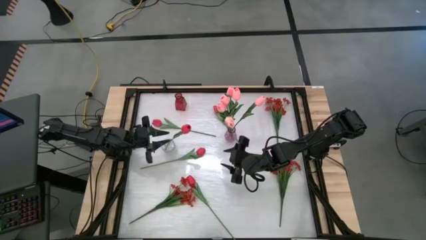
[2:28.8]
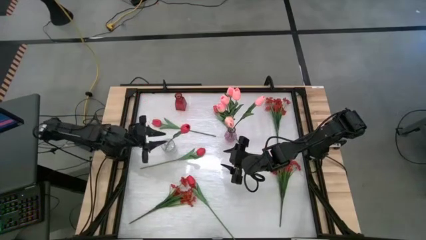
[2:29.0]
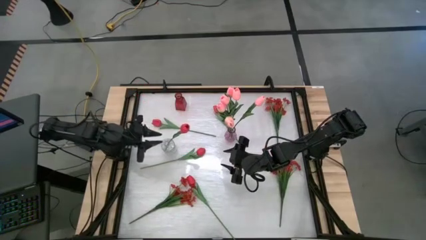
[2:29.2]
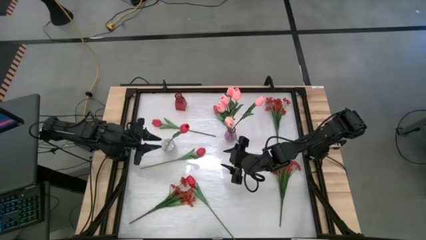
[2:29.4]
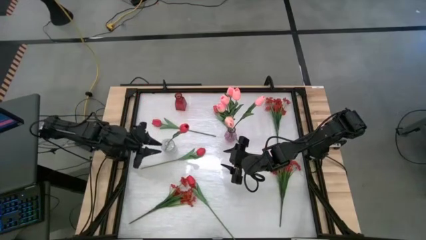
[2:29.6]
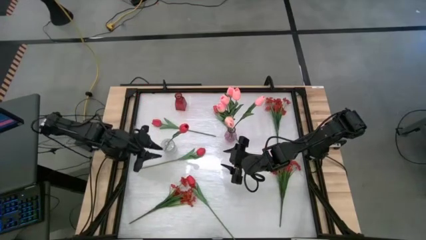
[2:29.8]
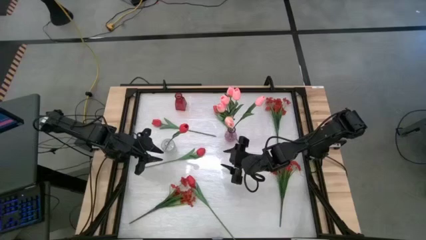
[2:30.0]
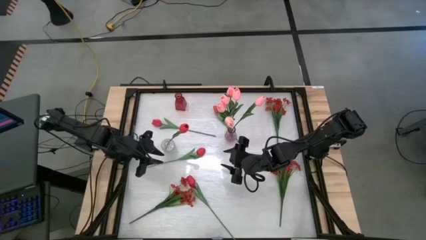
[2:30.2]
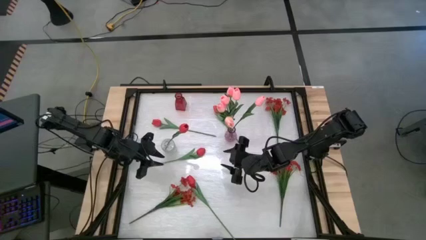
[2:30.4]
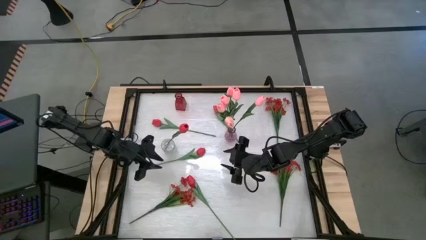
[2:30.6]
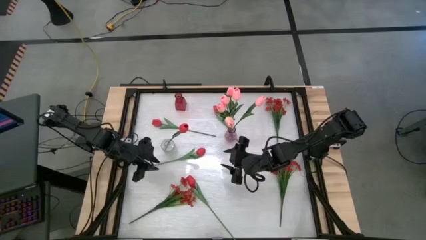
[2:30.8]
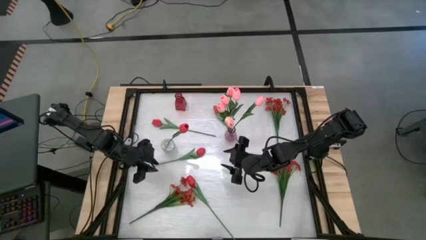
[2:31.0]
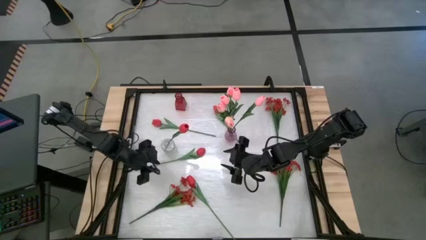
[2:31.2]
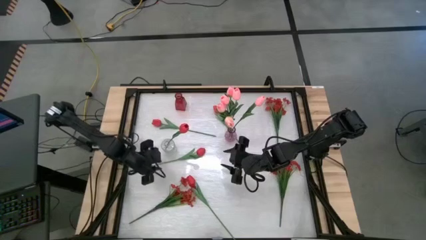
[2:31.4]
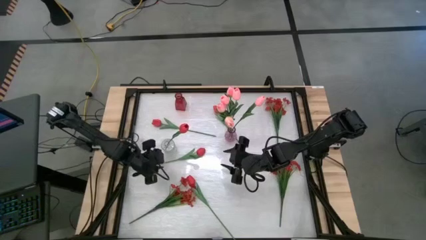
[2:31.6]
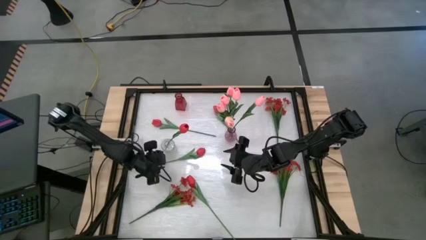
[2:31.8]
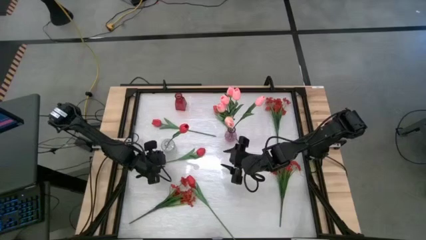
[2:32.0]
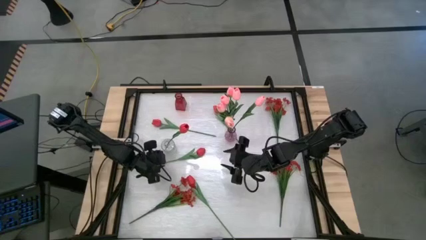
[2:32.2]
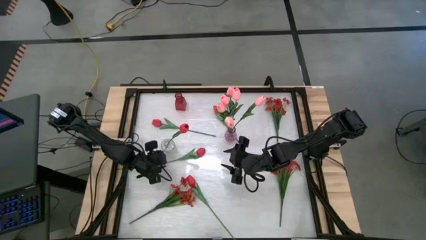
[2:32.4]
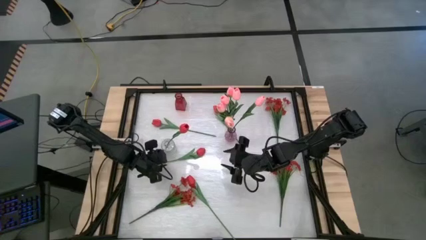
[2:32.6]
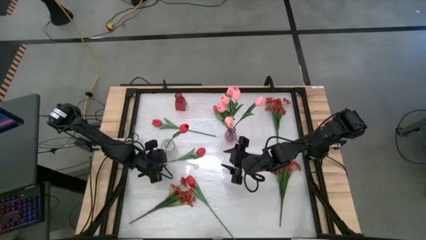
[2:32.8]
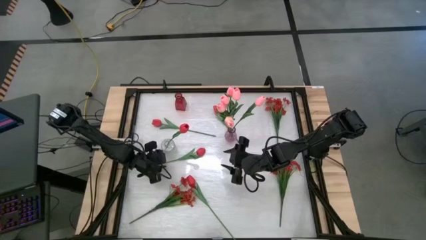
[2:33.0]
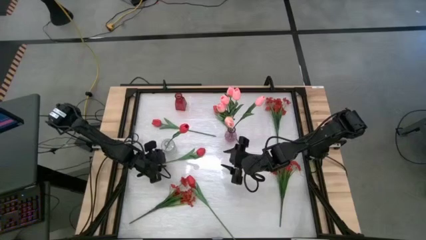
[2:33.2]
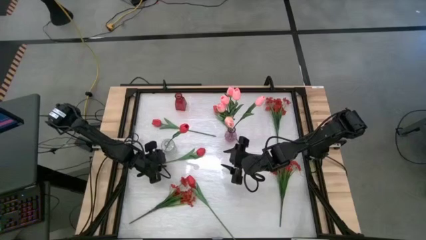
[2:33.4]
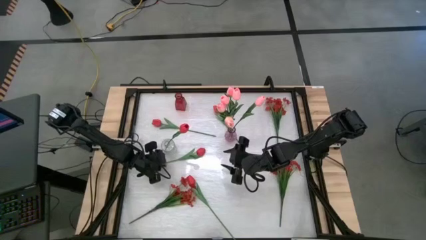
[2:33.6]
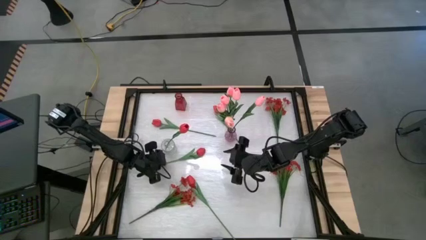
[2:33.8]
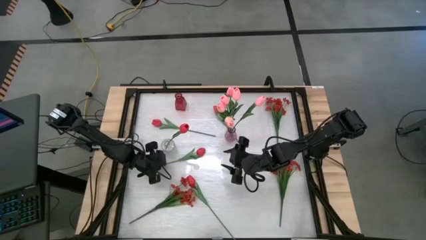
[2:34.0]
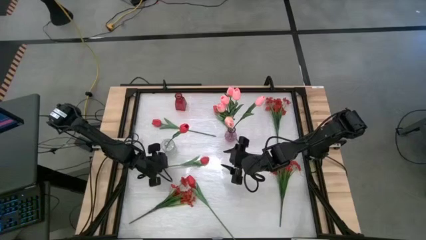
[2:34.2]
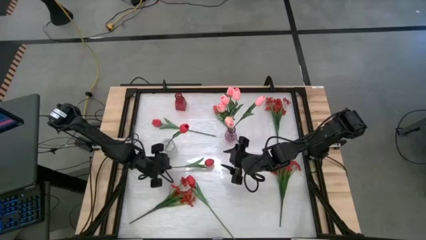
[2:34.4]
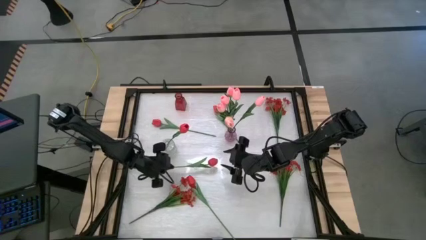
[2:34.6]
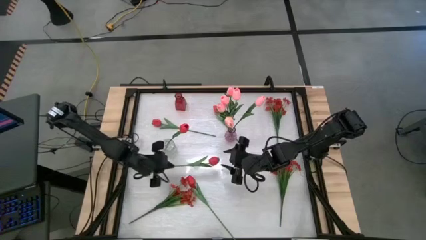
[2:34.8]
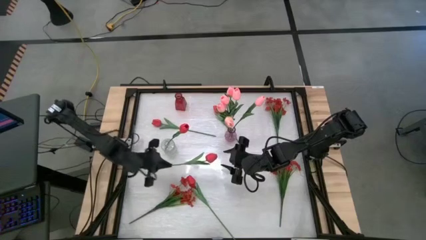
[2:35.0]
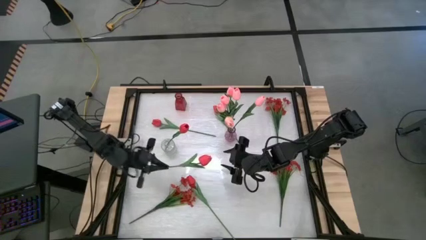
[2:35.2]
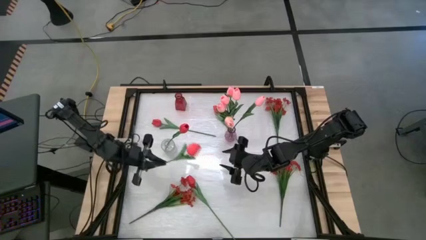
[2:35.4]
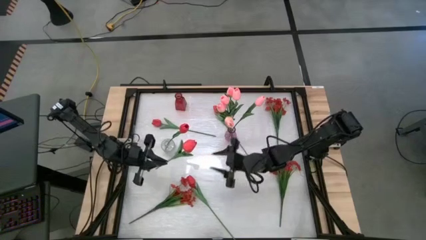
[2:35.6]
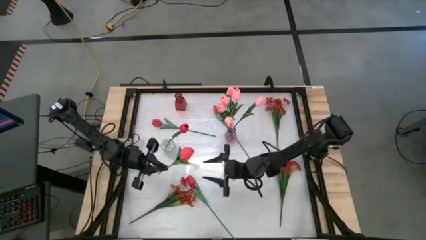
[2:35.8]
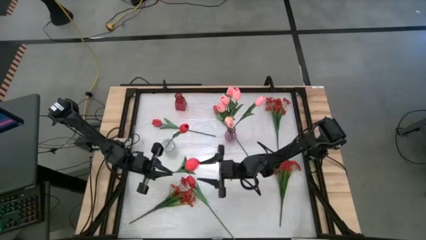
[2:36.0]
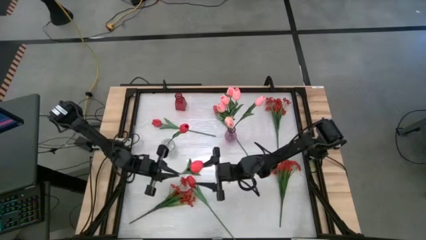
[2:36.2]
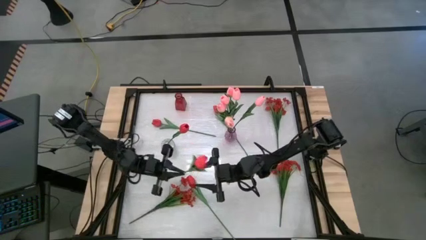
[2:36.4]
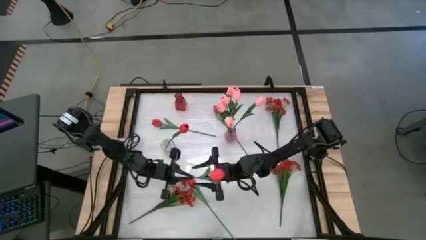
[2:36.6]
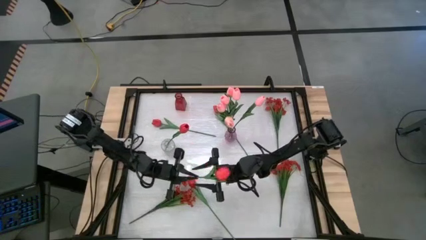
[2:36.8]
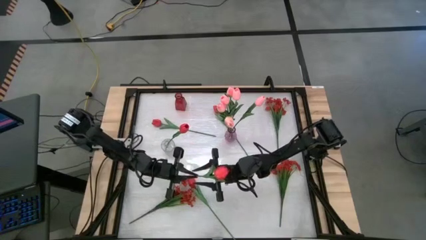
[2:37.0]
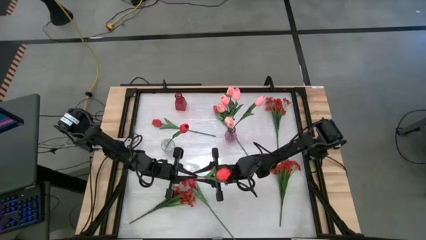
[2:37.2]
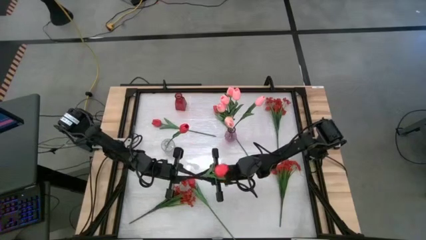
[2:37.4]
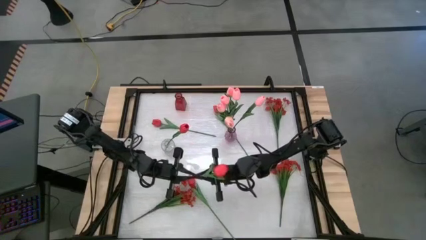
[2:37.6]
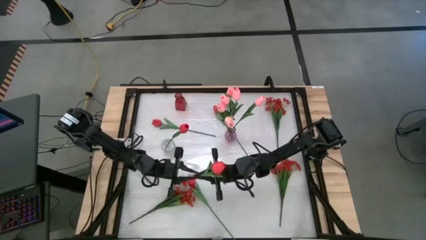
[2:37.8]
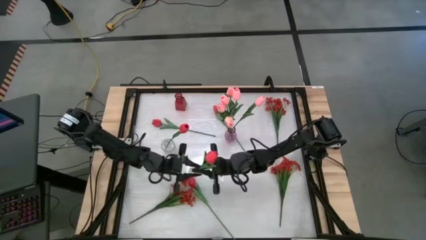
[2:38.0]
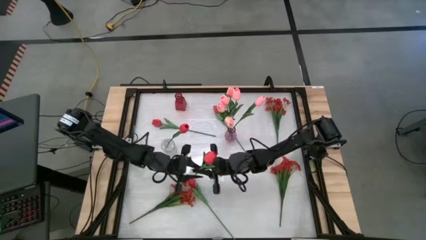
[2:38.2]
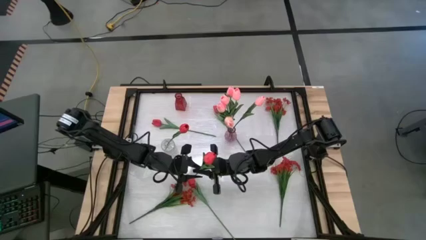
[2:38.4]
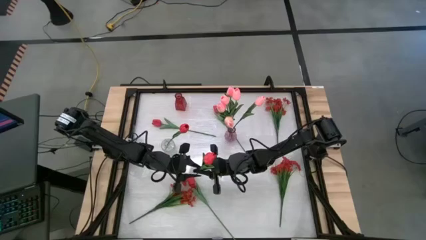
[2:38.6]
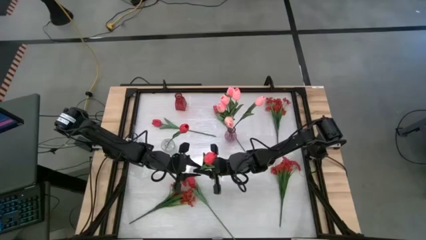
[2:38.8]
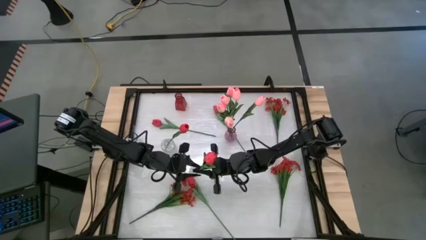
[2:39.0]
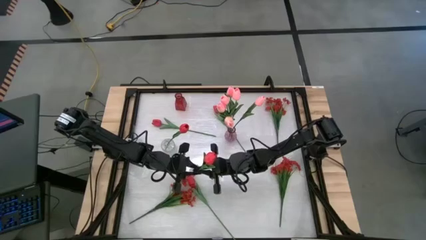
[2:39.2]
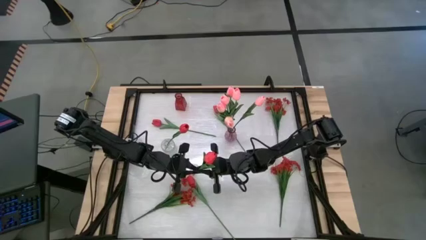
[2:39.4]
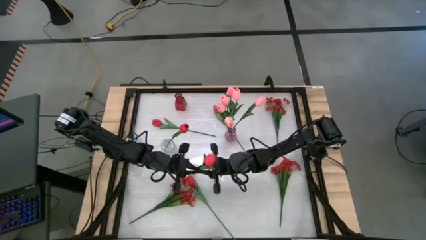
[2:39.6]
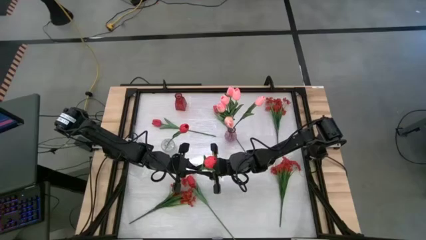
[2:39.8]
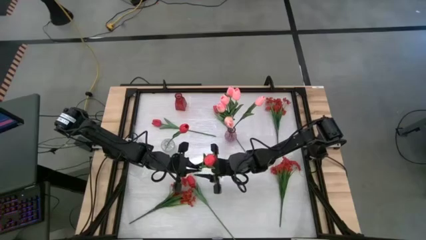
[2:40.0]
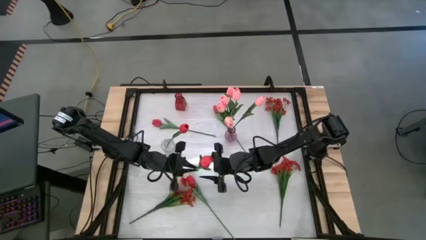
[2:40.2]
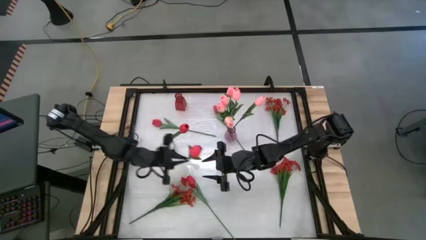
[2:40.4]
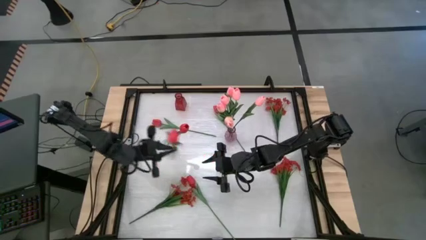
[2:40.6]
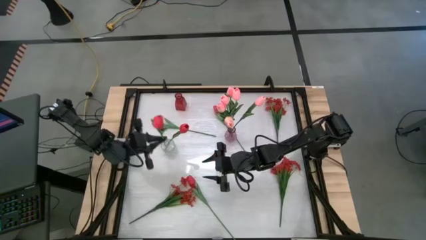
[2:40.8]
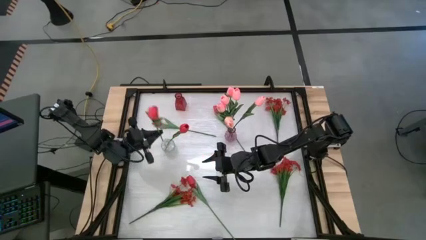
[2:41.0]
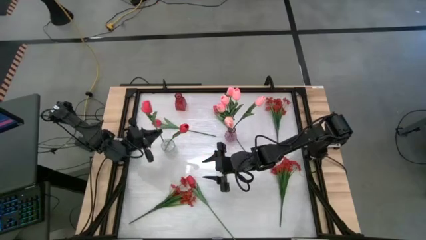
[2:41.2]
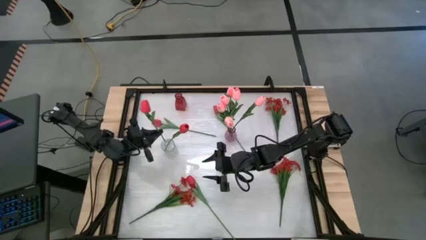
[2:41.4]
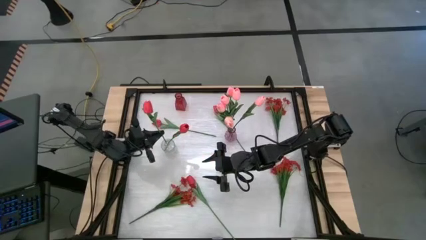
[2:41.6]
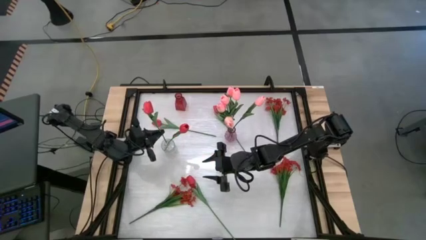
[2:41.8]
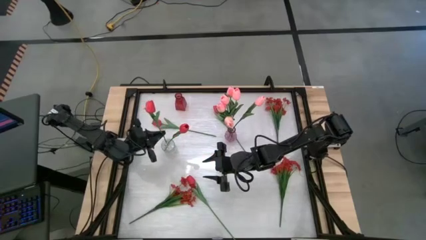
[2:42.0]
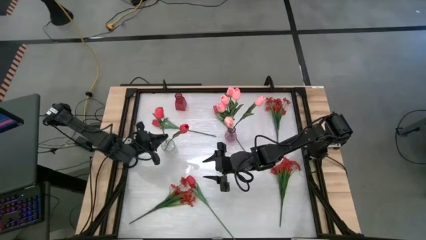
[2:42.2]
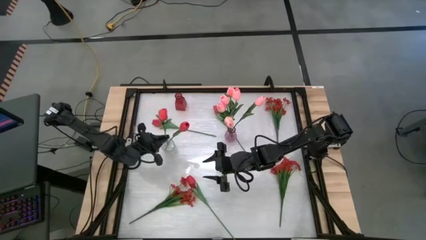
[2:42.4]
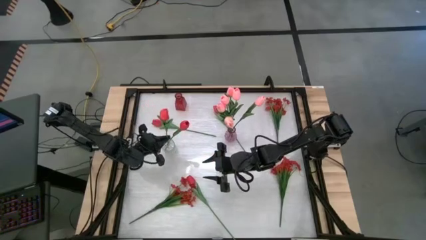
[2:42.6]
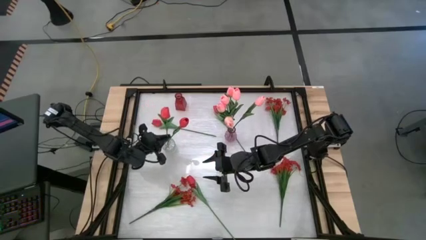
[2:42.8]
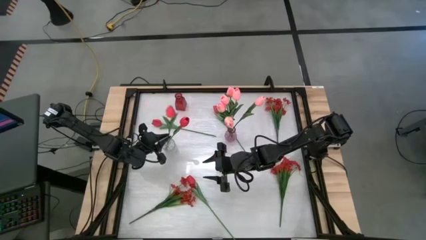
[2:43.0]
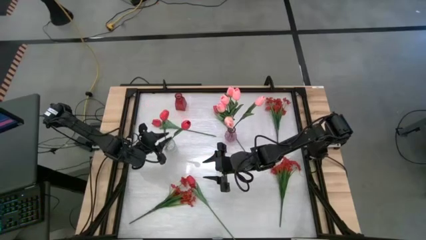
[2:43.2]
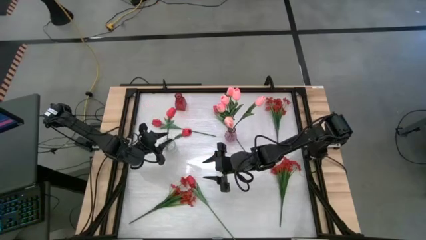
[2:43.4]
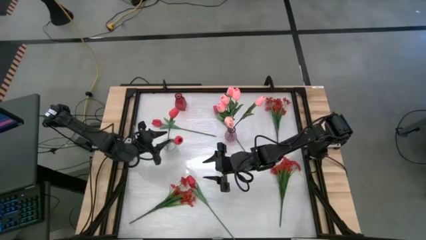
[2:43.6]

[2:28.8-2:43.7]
Task: Sort flowers into vase by color
Put the red tulip into the transparent vase

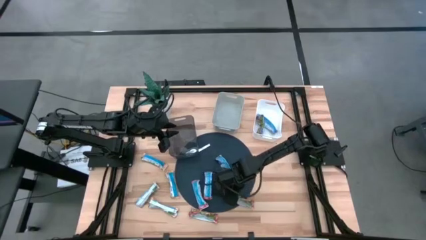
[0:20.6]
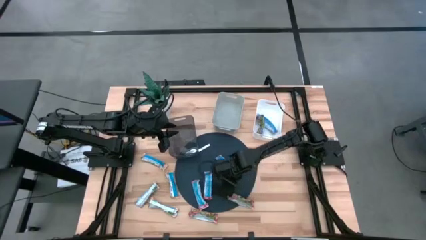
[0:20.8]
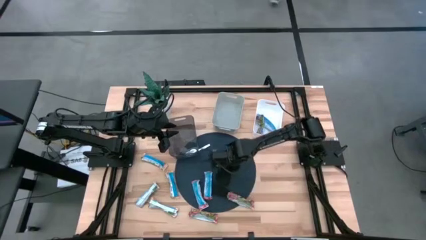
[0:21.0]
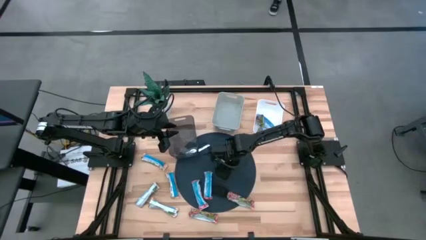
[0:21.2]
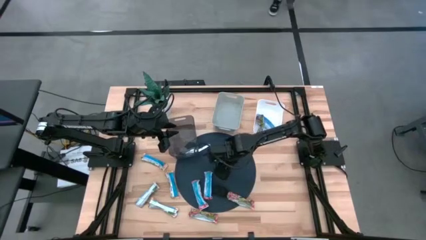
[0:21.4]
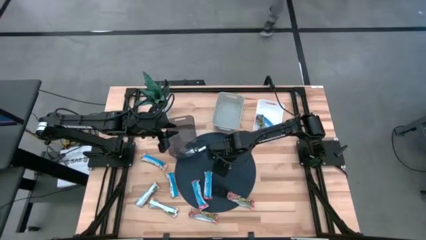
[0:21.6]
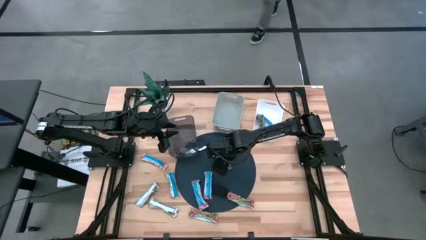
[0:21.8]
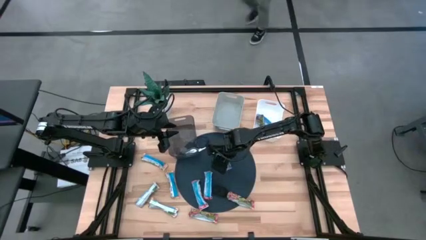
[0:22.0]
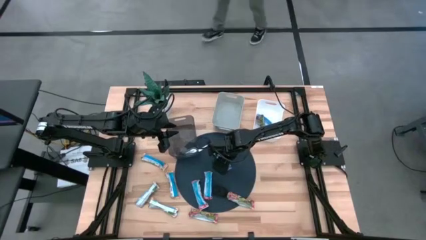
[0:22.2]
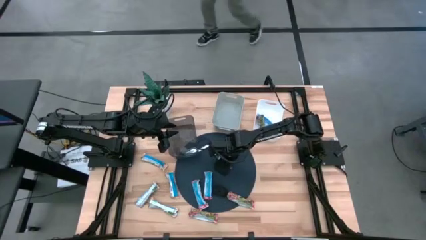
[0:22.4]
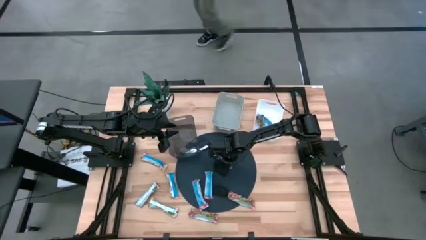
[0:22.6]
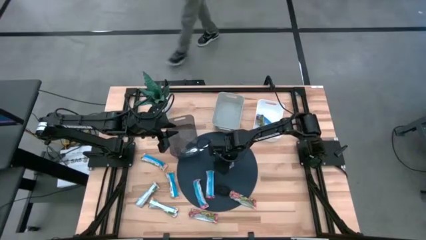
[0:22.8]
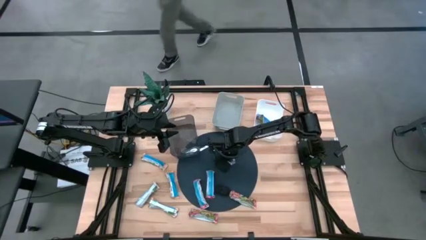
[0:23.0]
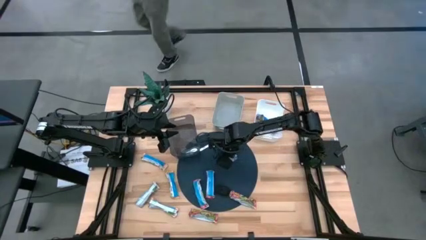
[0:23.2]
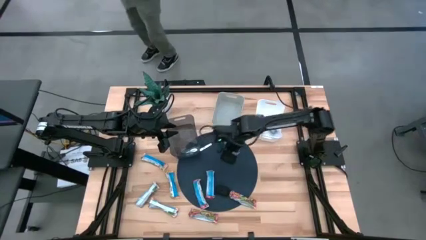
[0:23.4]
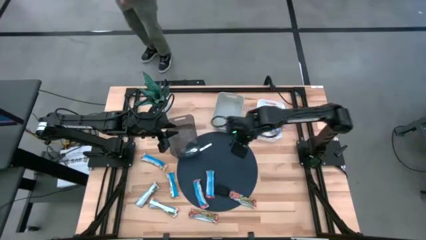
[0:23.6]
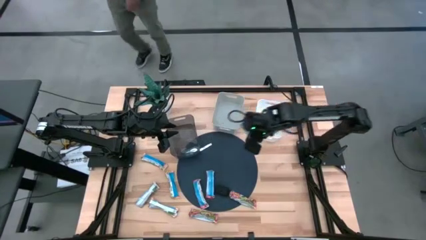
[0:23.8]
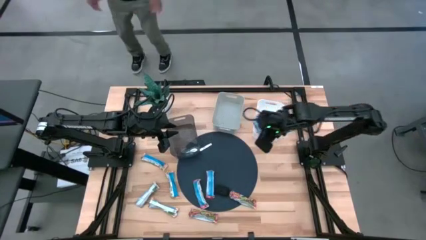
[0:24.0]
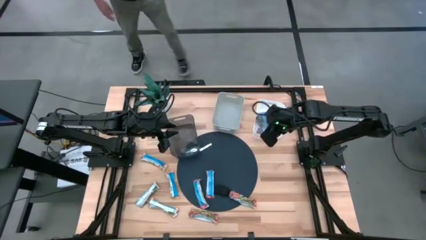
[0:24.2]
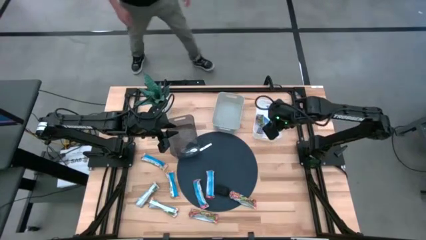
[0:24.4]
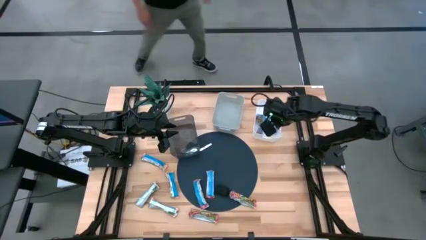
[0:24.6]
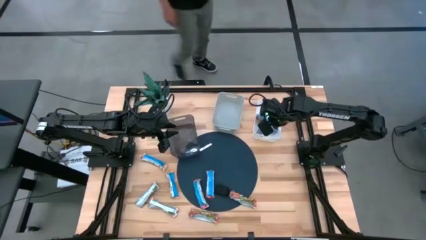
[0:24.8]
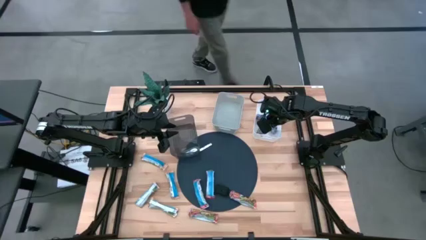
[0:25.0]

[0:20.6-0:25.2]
Task: Pick and place Granola Bars by type
Put the blue granola bar into the white bin
